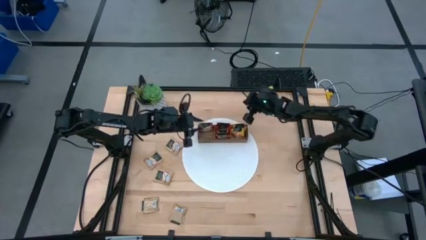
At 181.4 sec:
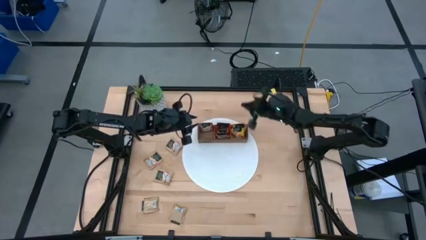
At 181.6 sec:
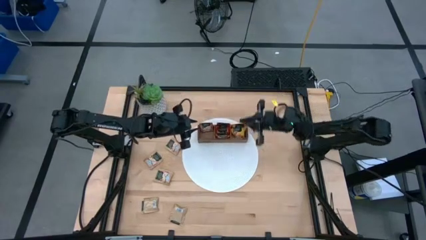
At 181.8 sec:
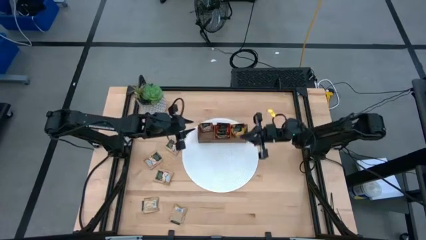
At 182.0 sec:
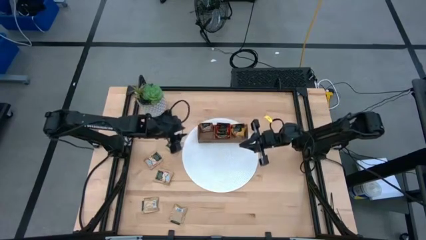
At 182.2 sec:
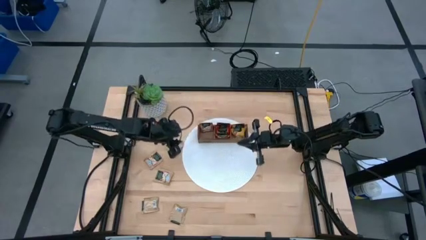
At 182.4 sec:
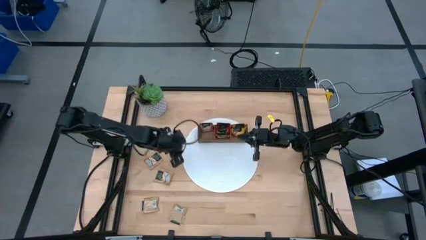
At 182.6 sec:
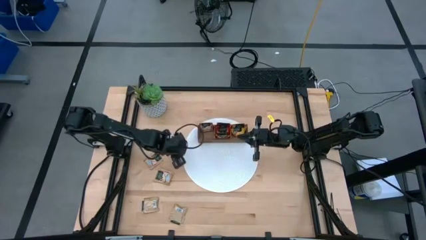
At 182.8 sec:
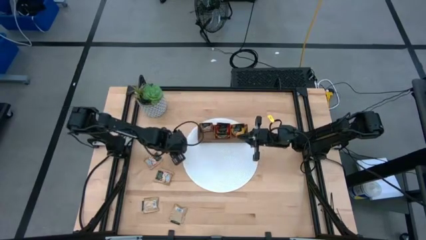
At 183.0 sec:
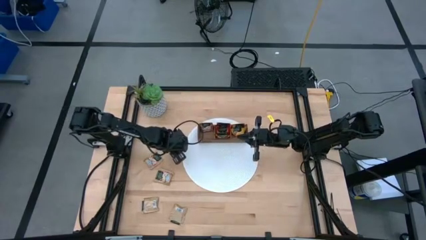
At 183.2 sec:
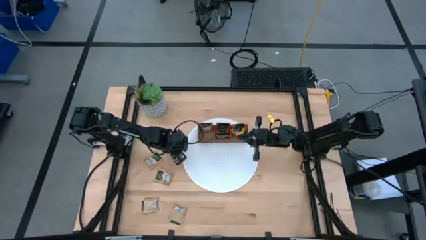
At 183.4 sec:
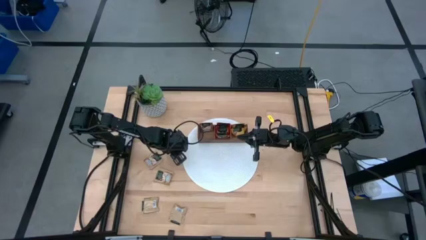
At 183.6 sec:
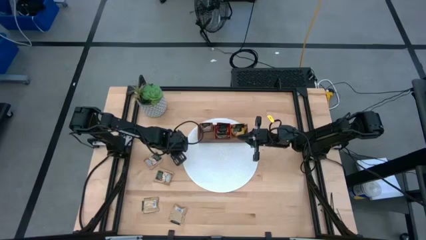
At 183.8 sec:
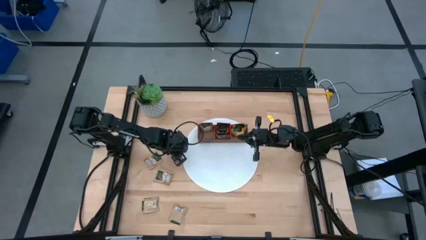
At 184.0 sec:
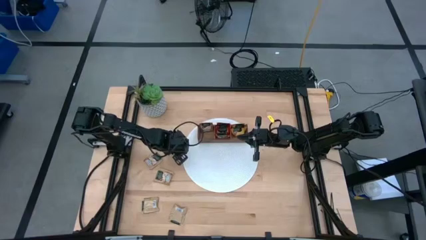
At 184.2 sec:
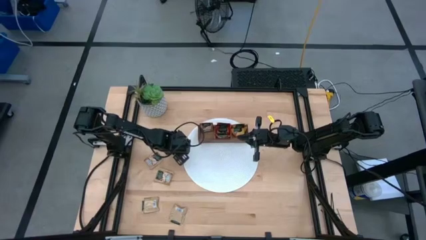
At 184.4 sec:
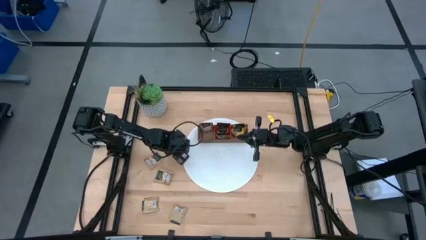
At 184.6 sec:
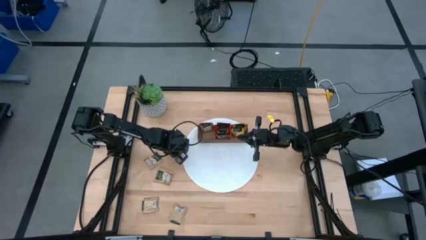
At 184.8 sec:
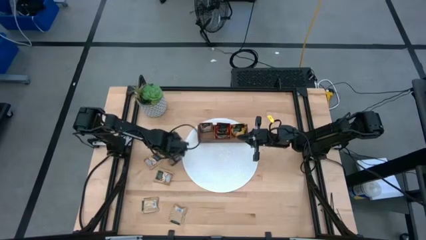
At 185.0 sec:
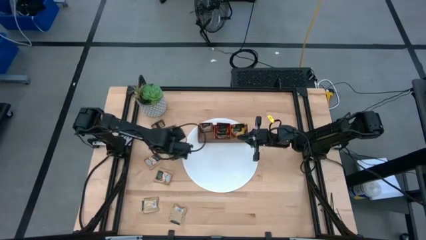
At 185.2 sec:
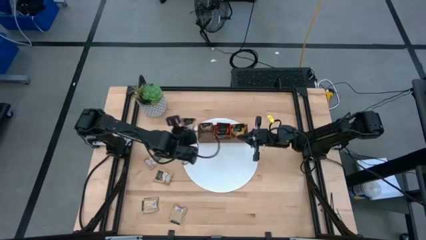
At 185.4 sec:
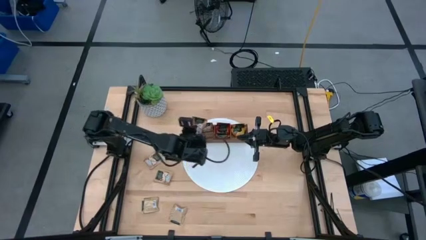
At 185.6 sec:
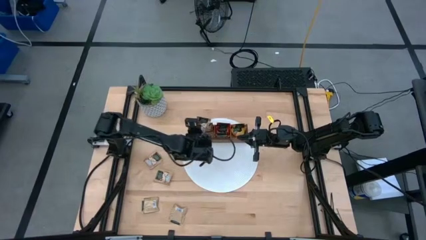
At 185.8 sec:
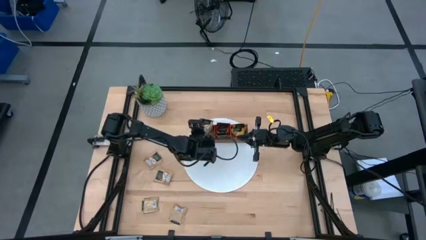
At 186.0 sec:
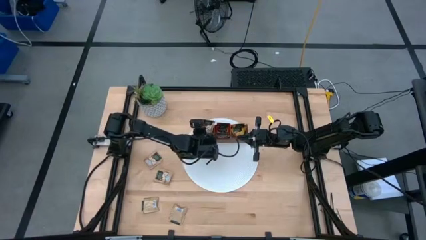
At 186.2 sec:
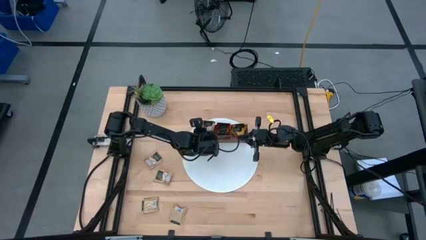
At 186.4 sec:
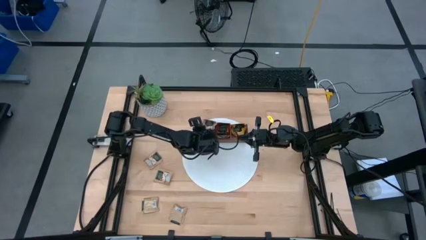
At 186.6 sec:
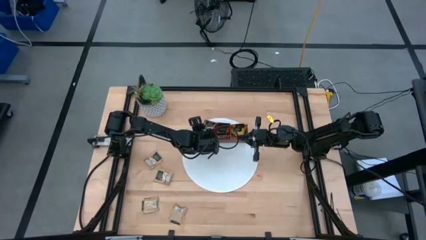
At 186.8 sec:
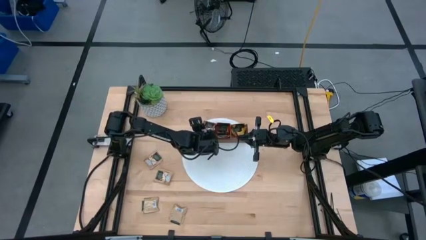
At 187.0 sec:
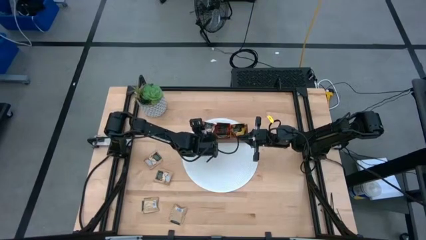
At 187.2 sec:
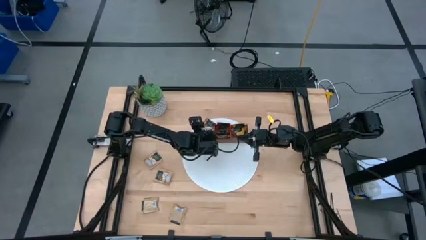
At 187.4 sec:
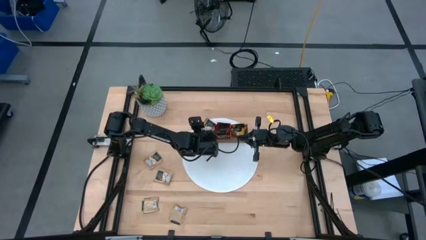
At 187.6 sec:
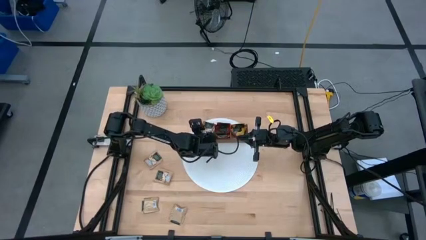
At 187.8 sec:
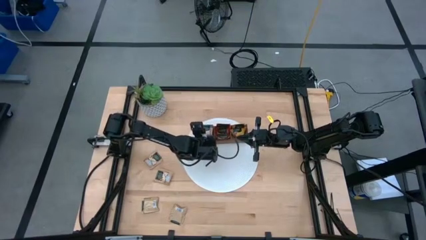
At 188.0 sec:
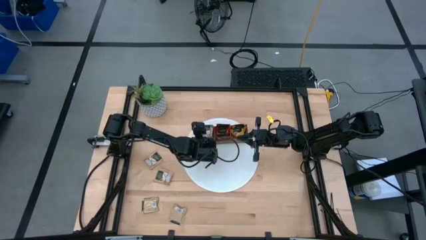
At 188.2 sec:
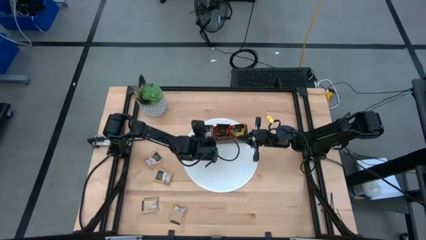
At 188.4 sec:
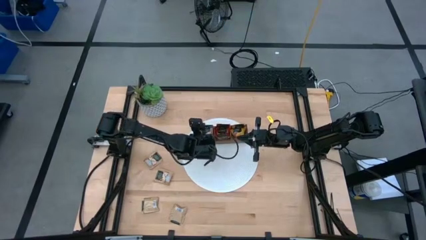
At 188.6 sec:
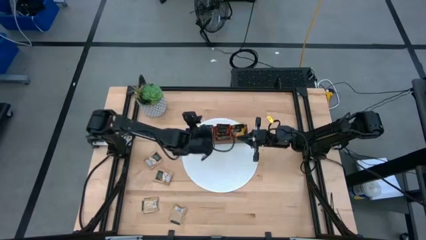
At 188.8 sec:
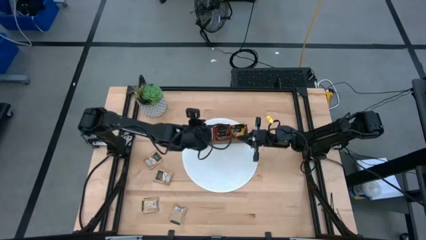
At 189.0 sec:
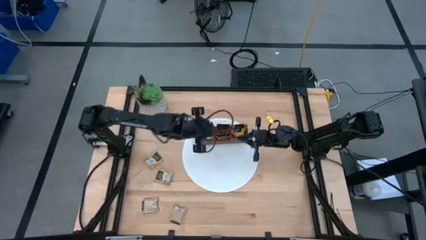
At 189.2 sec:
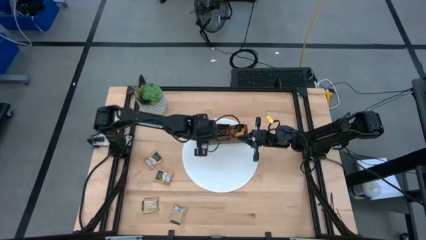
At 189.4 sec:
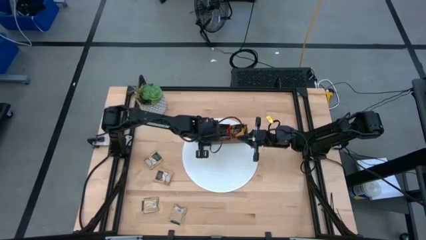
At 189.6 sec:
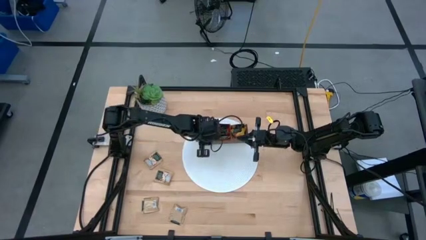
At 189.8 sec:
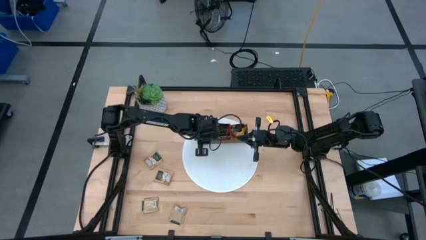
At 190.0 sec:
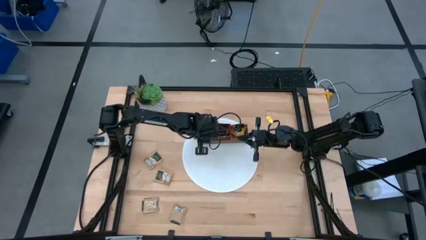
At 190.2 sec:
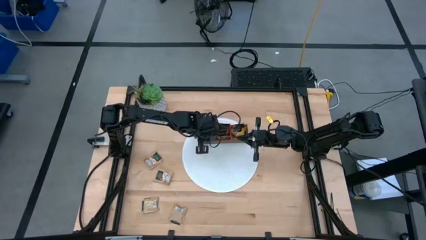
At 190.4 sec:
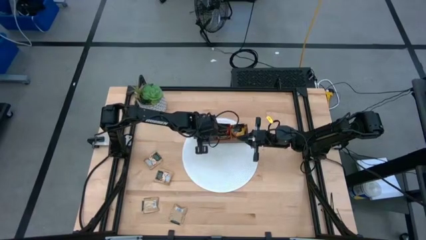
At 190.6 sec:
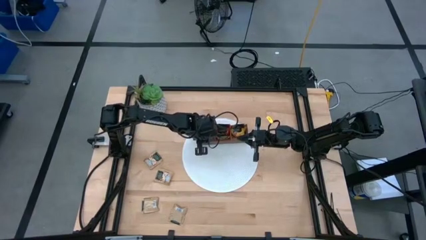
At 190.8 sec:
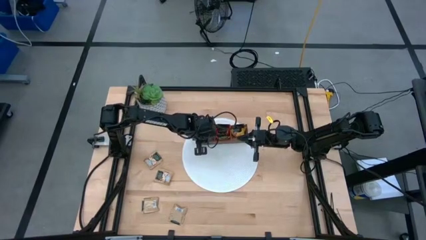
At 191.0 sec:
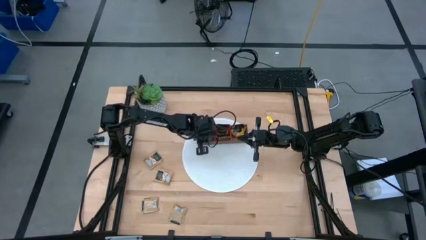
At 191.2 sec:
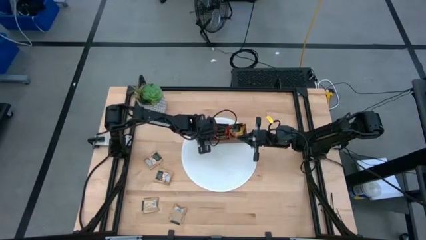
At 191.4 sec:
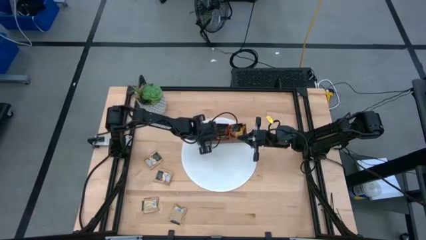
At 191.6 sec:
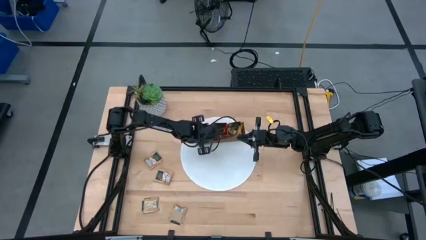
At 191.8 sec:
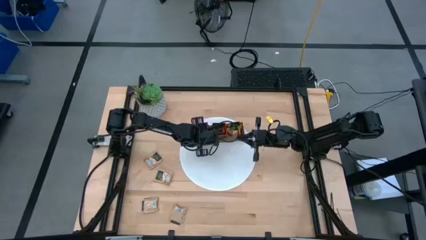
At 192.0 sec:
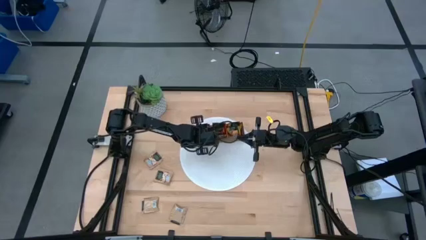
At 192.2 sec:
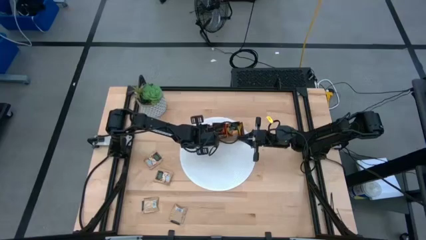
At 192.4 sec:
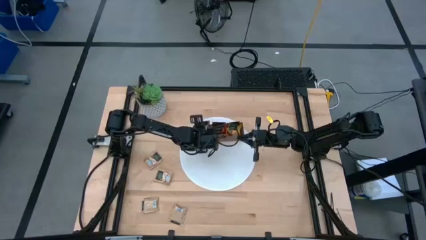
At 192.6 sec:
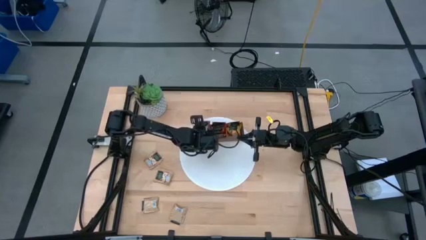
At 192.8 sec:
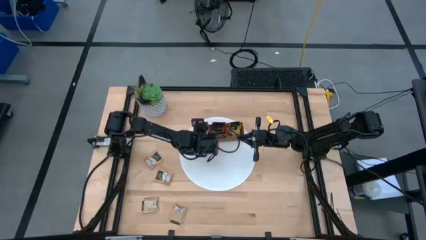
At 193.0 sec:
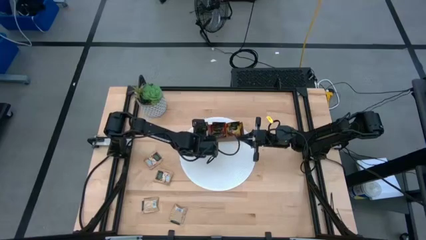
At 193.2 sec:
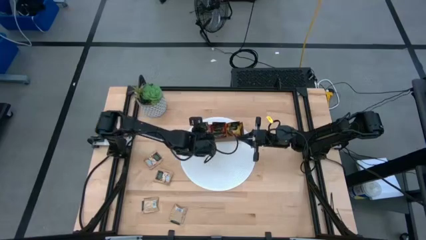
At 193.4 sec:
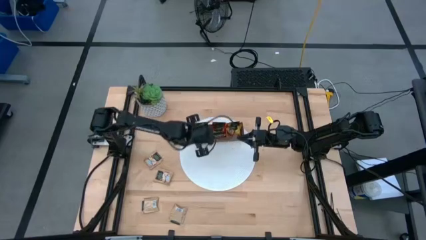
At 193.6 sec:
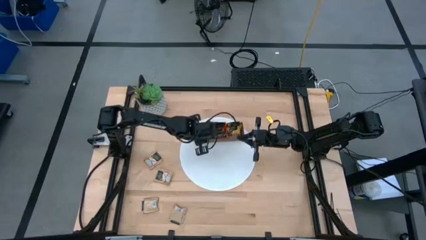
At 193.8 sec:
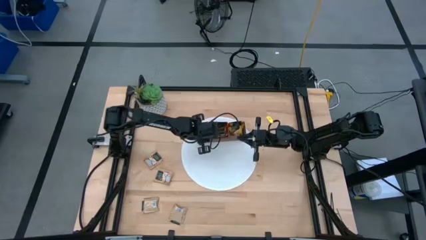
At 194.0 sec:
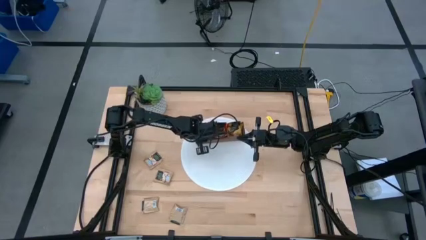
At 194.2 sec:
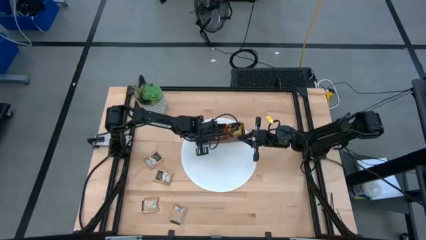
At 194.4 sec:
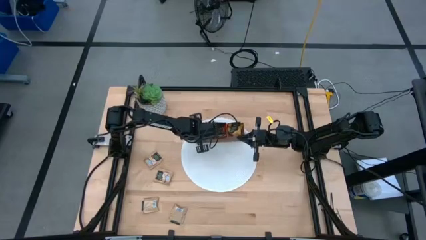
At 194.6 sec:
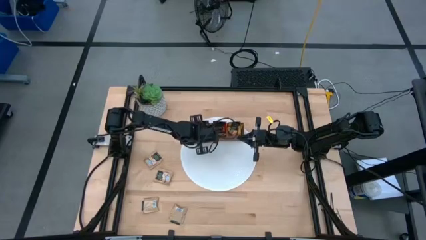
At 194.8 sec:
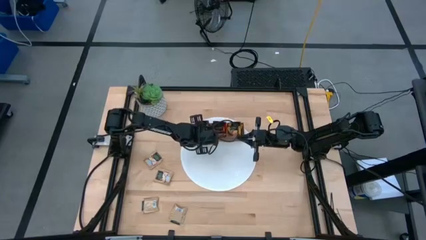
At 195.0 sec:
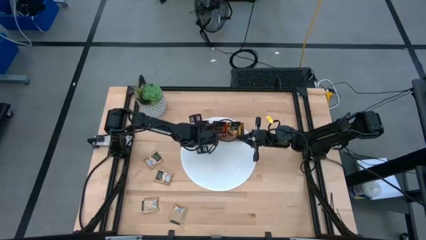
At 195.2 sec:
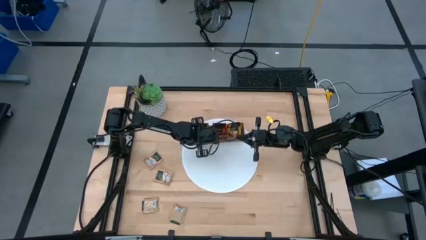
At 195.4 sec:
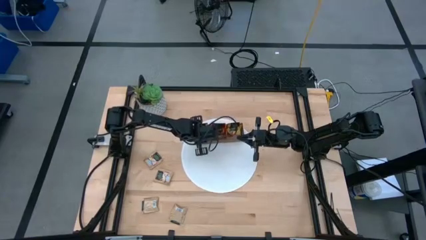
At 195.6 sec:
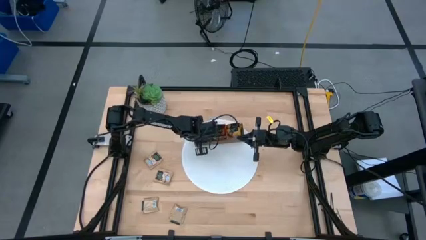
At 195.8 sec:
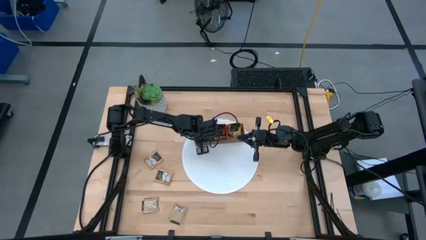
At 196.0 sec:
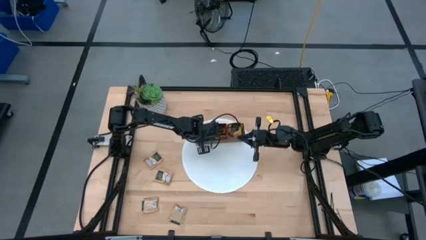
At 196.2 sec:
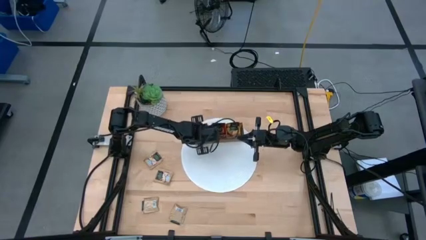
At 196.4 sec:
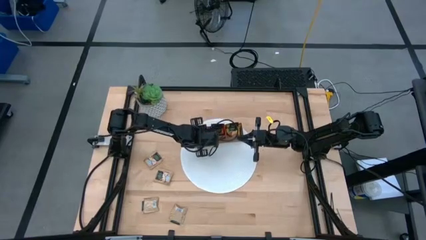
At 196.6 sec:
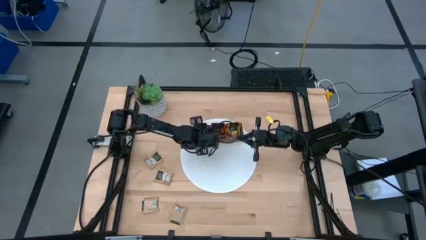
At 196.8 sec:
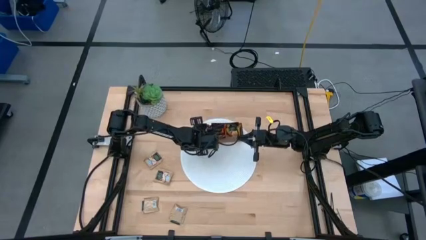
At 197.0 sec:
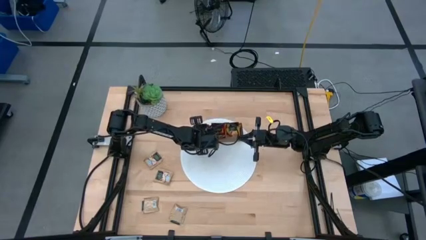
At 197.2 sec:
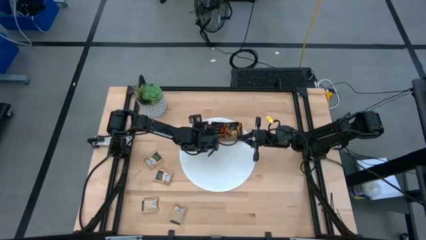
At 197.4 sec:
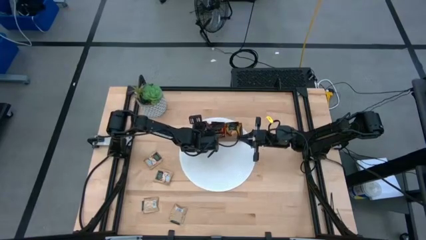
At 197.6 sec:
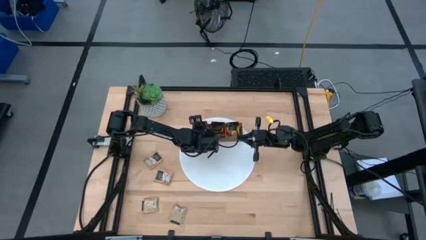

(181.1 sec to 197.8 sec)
Task: Pick & Place Tea
Put the brown tea bag into the left section of the wooden organizer
